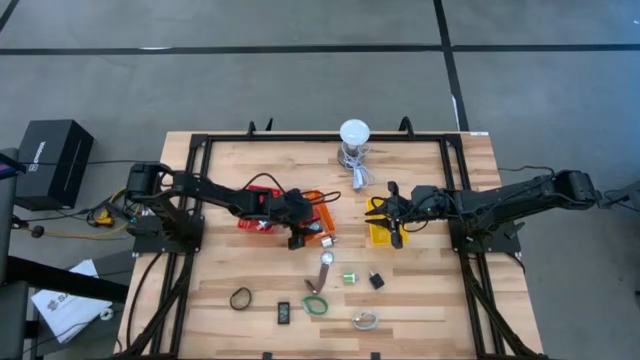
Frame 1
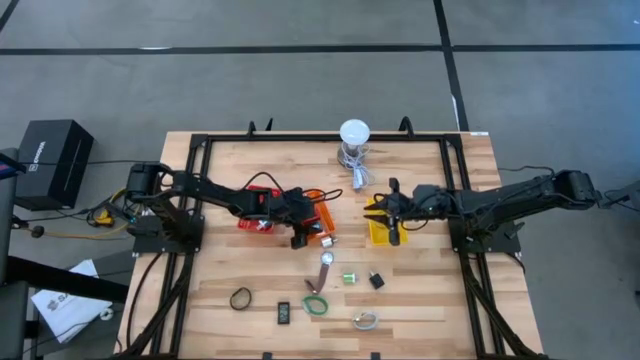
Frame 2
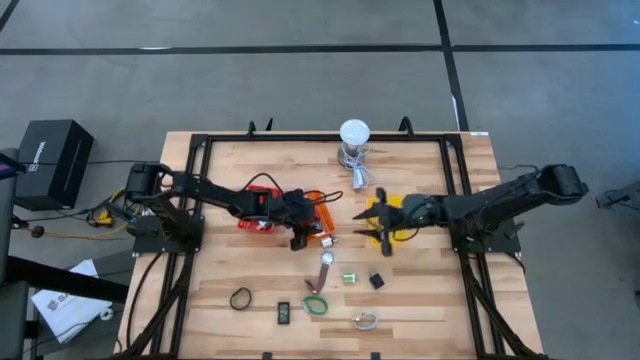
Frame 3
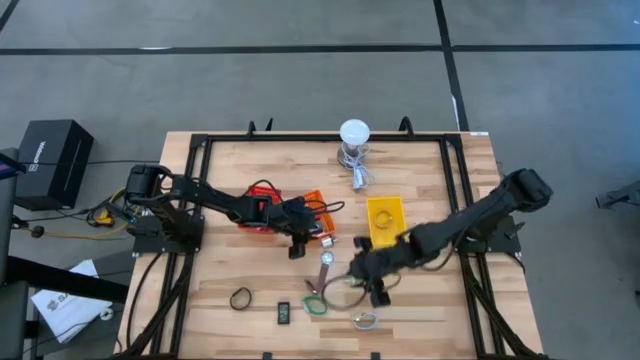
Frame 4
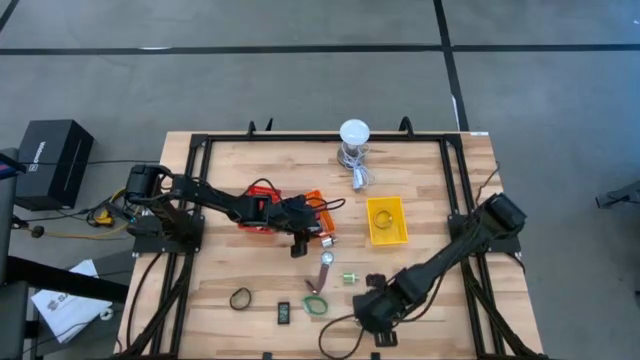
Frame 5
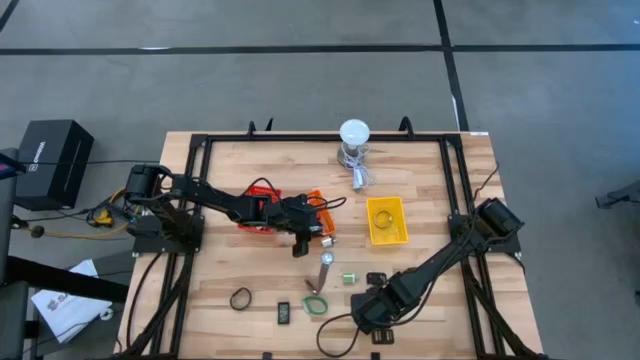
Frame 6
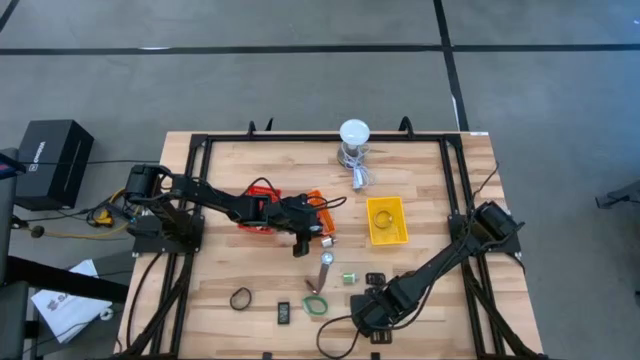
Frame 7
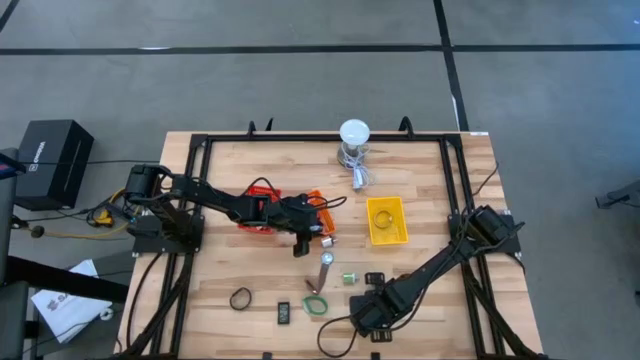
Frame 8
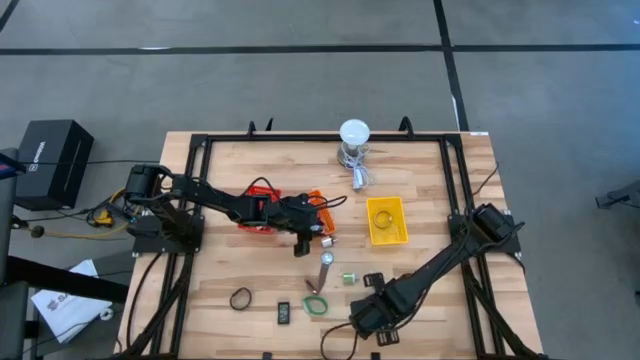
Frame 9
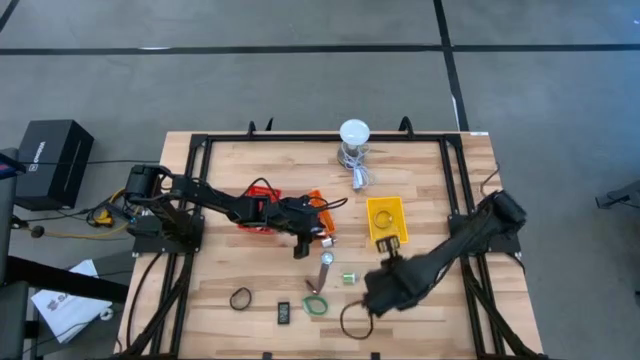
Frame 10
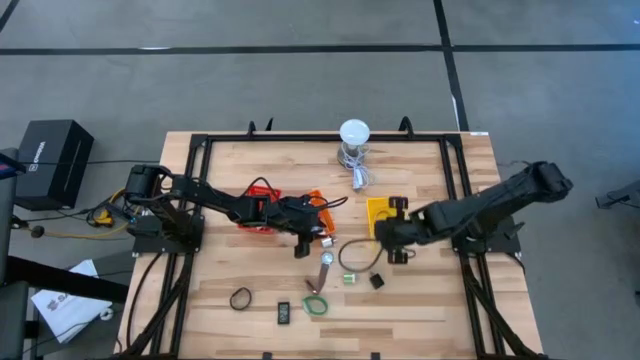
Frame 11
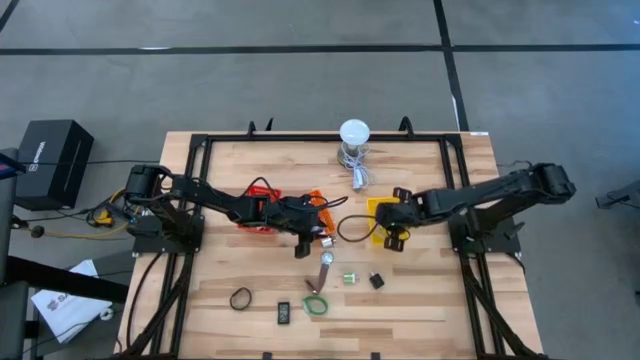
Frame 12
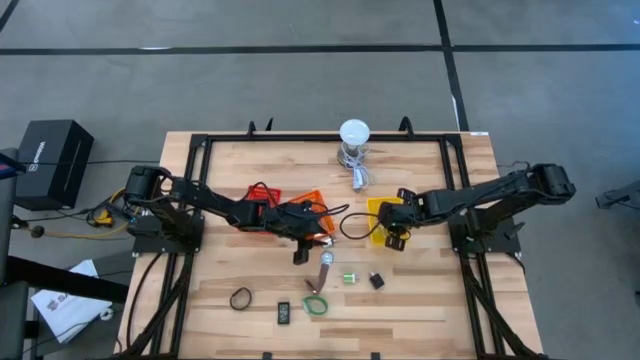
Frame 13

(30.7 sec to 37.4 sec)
Task: Pick & Place Office items
Put the white wrist watch into the yellow bin

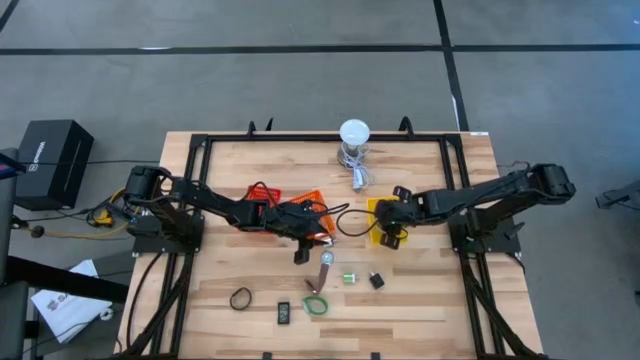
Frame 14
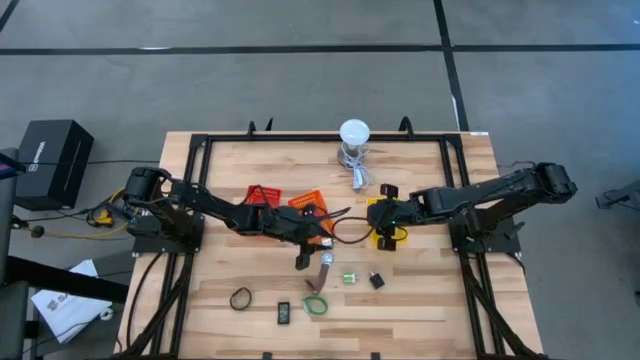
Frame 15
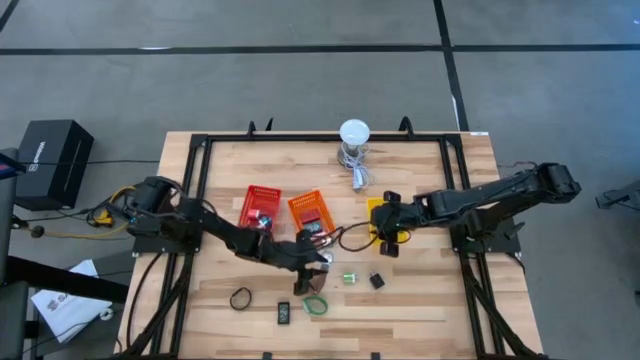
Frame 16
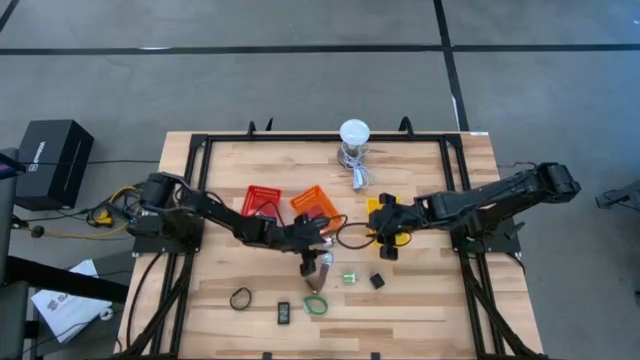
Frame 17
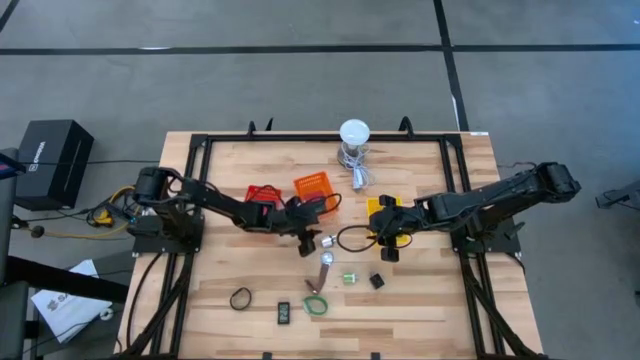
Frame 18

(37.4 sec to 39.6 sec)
Adjust the orange bin

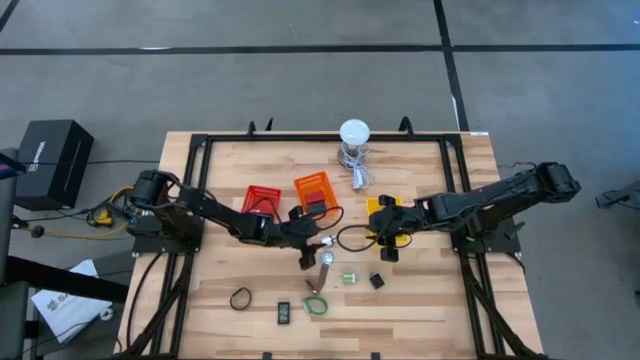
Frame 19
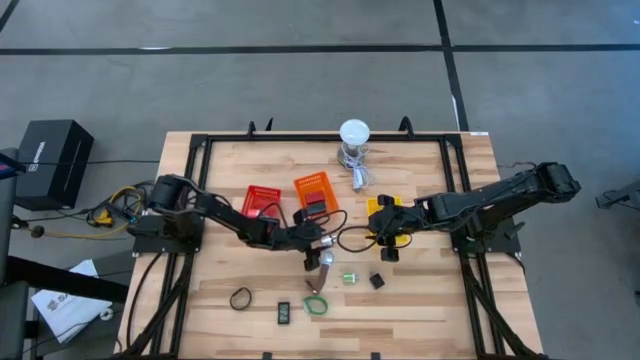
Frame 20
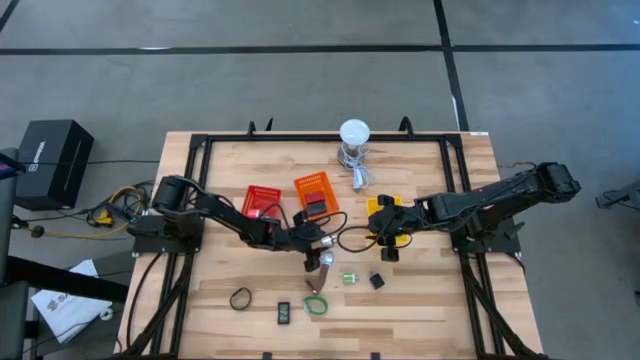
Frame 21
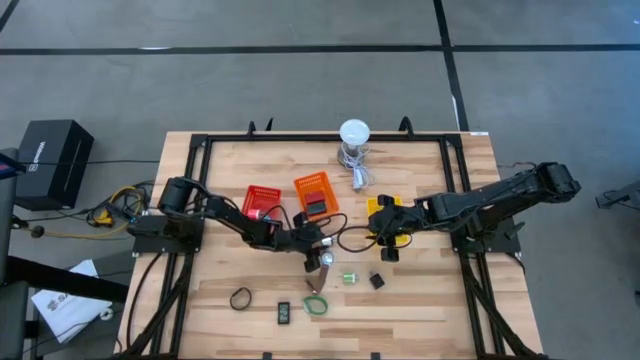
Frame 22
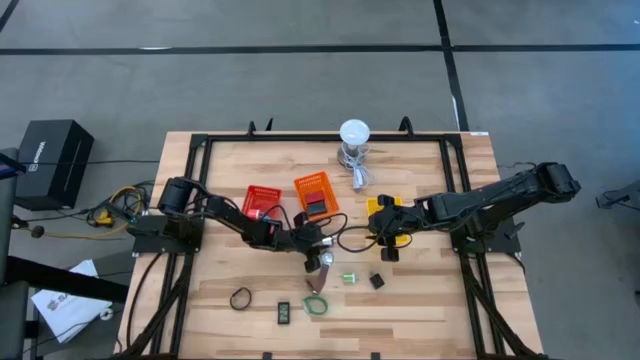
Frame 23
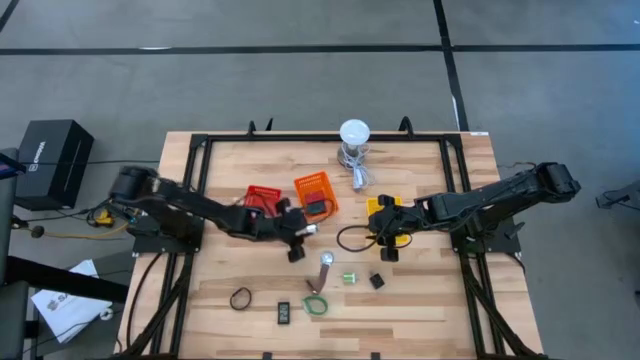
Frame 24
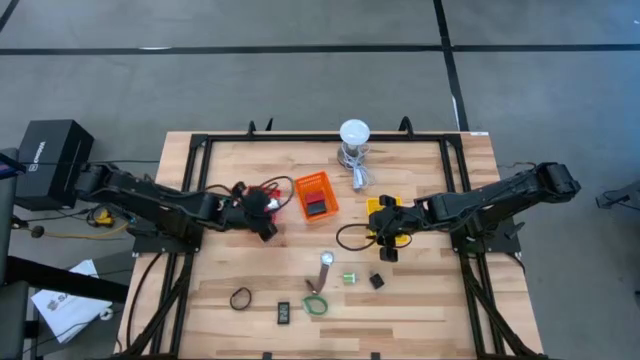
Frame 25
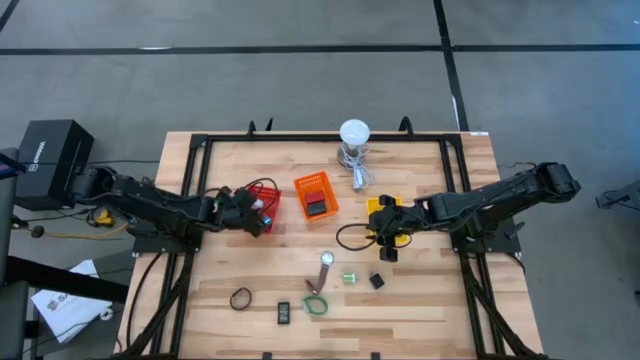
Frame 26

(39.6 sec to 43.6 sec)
Put the white charger adapter into the red bin

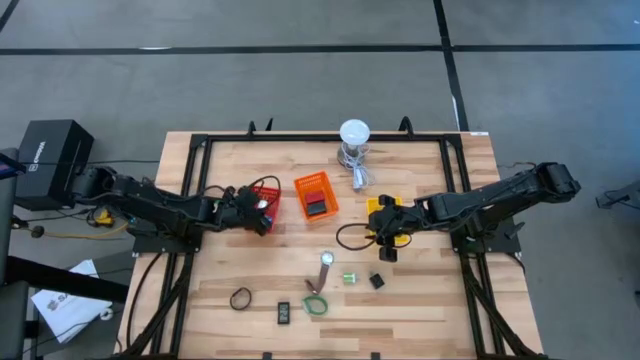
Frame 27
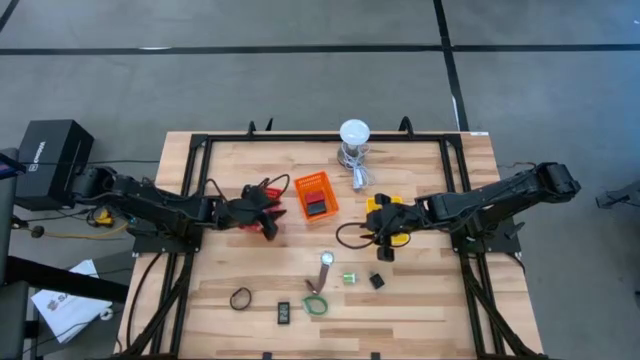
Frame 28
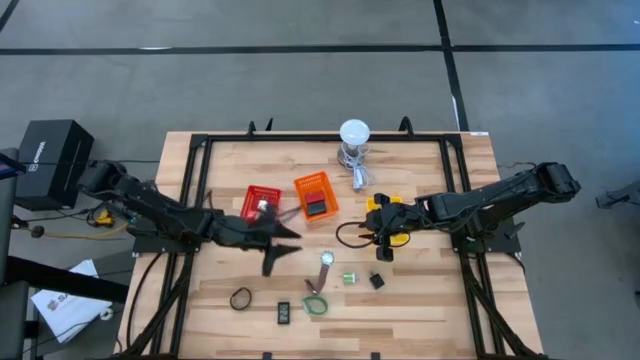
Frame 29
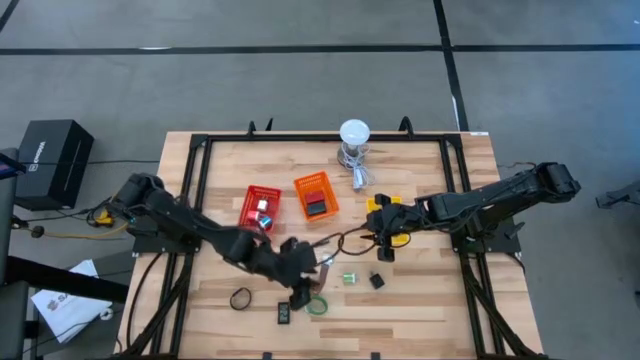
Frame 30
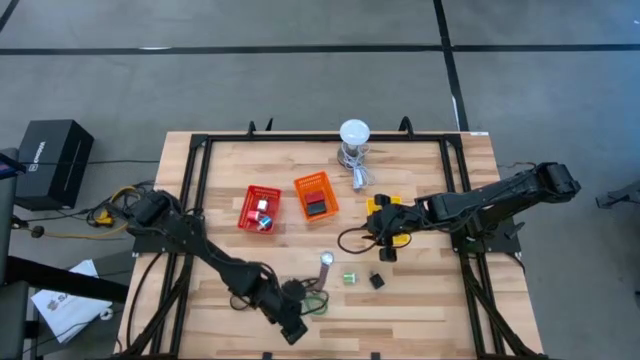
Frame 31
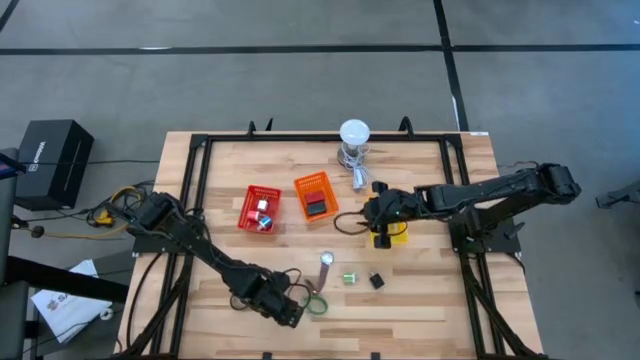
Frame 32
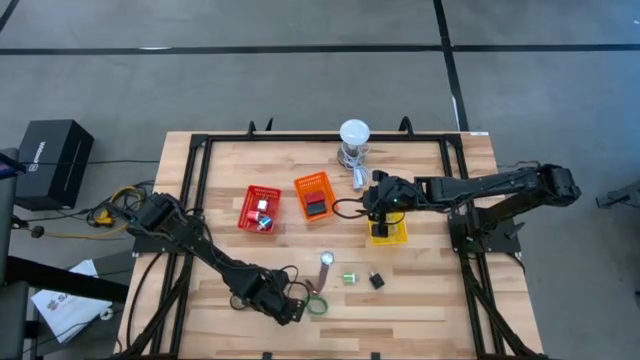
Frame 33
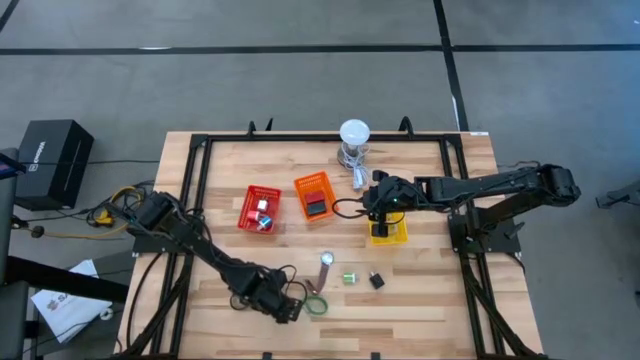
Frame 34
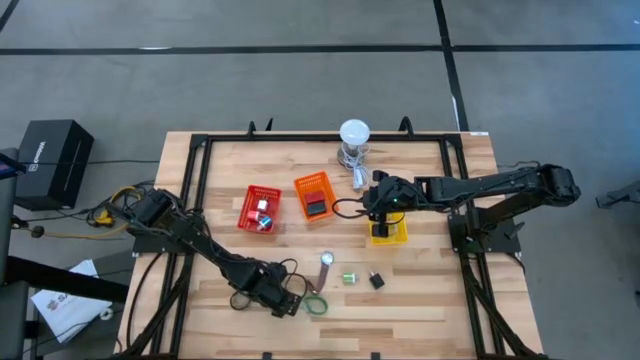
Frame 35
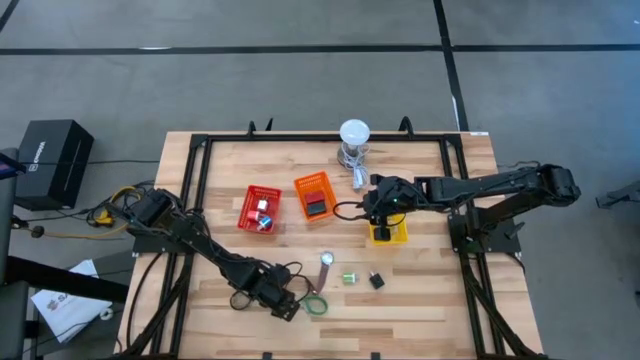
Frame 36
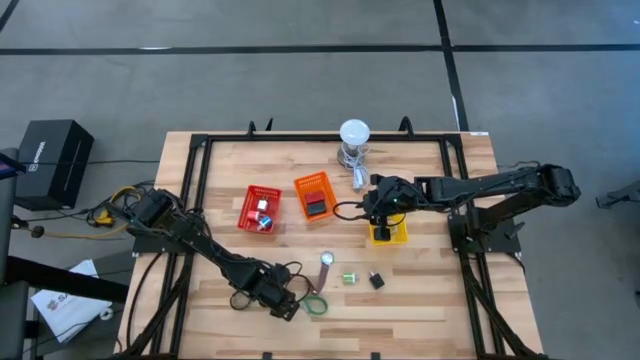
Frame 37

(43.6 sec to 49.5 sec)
Put the black digital clock into the orange bin

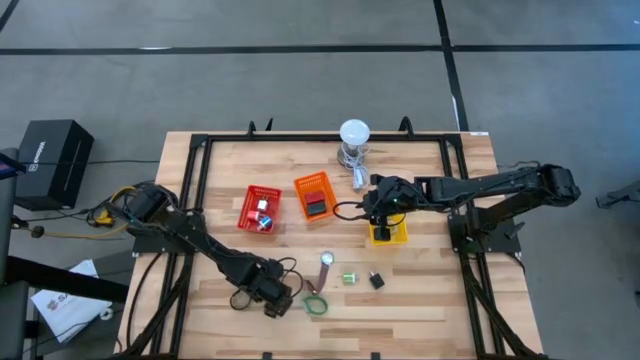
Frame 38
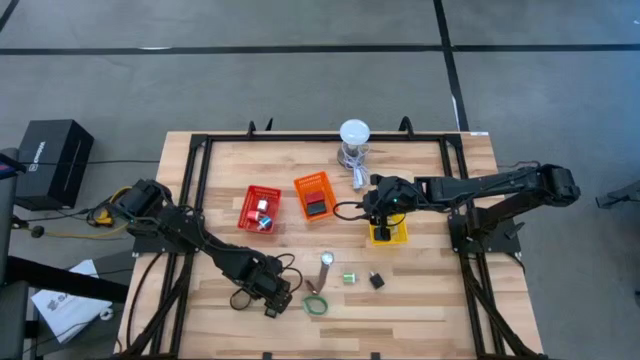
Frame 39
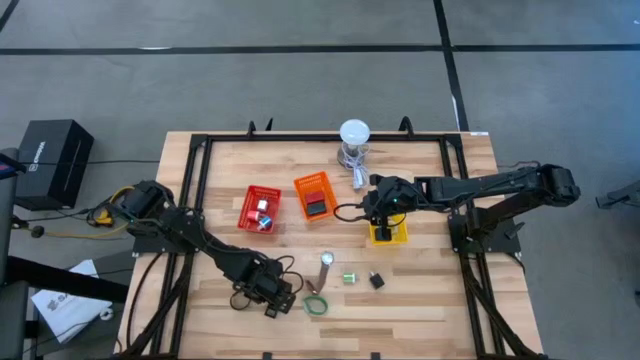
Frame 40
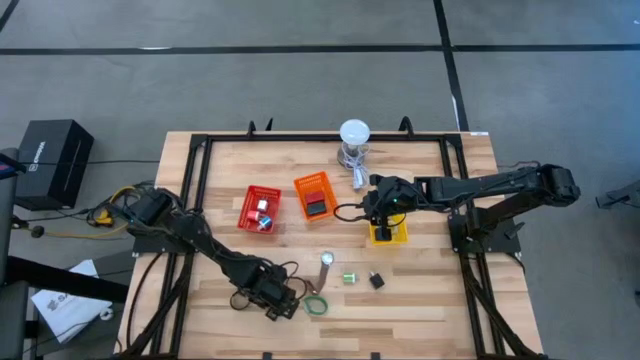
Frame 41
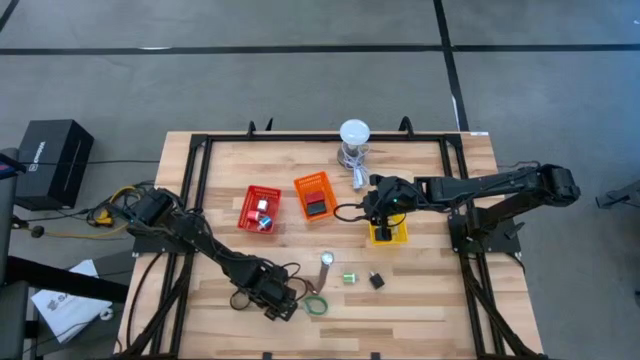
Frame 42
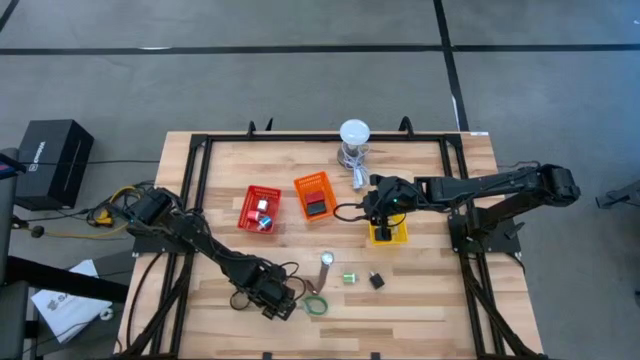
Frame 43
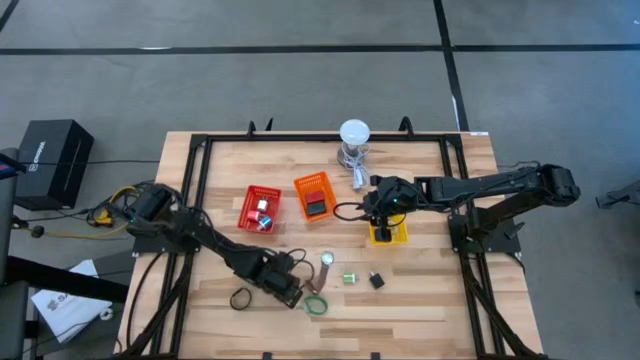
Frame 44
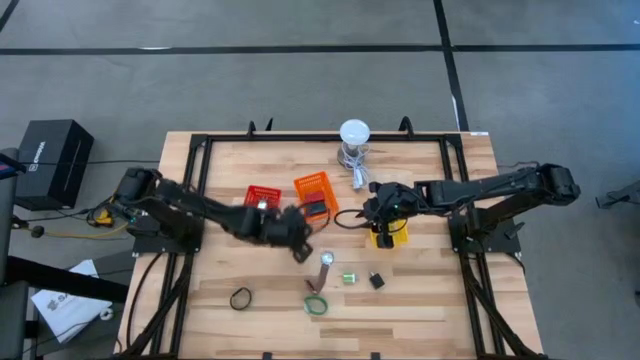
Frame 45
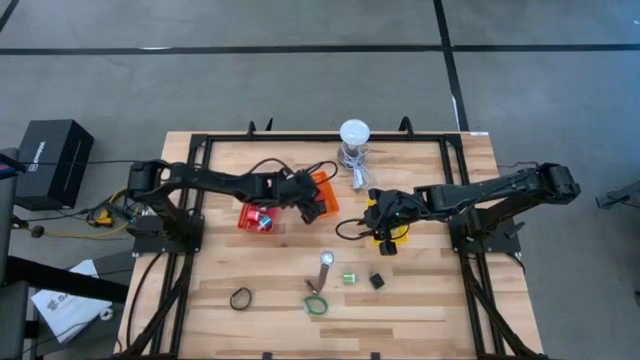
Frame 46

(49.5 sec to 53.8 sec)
Put the black digital clock into the orange bin
